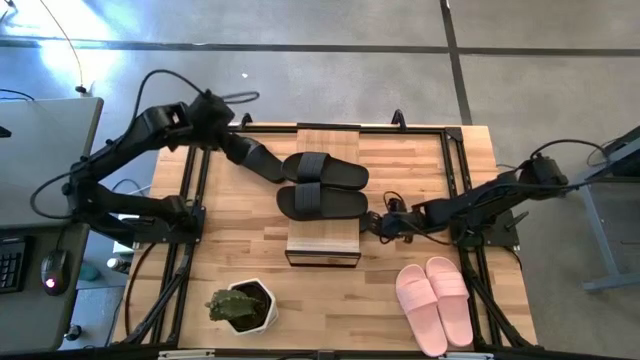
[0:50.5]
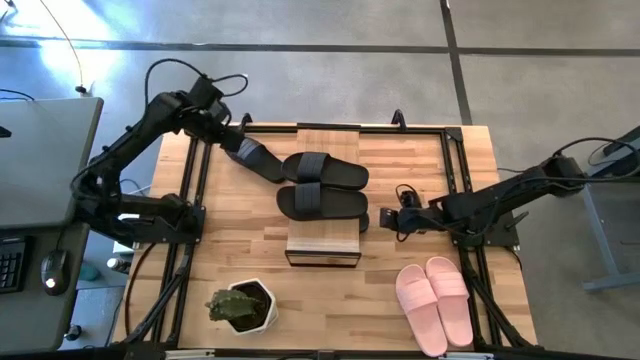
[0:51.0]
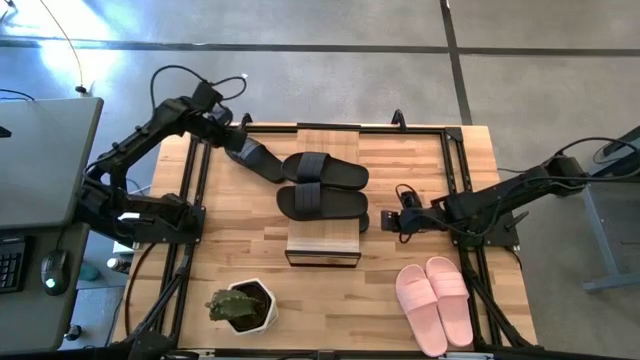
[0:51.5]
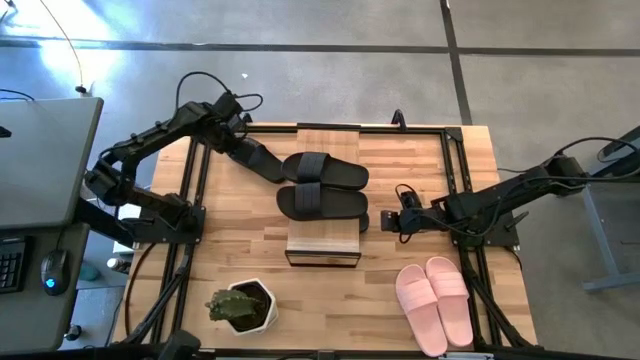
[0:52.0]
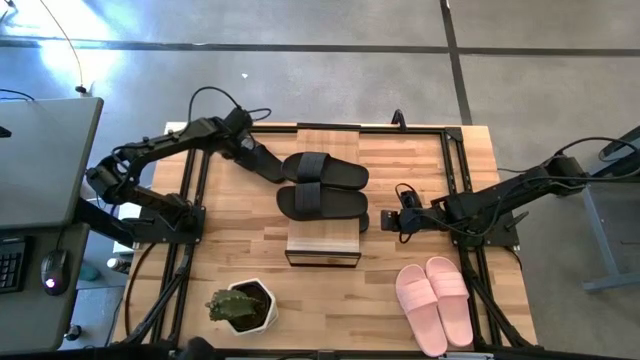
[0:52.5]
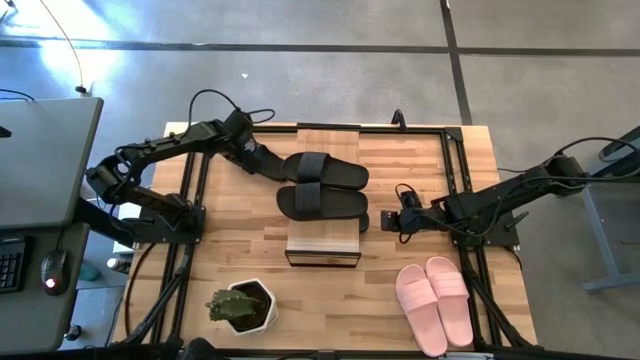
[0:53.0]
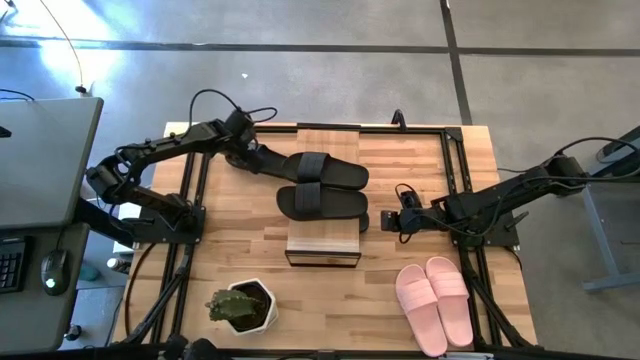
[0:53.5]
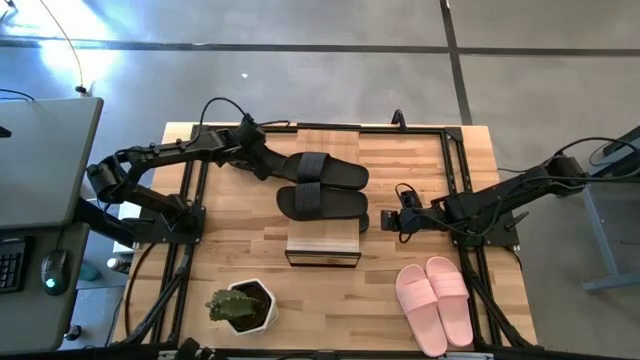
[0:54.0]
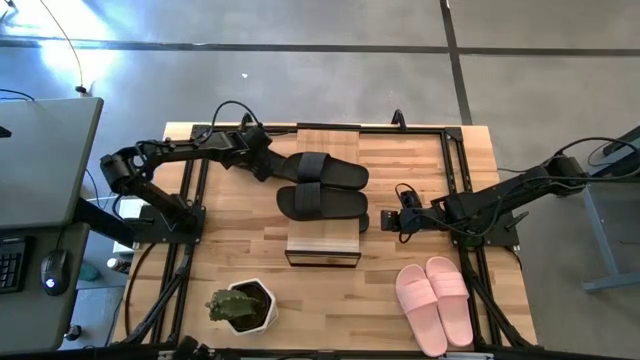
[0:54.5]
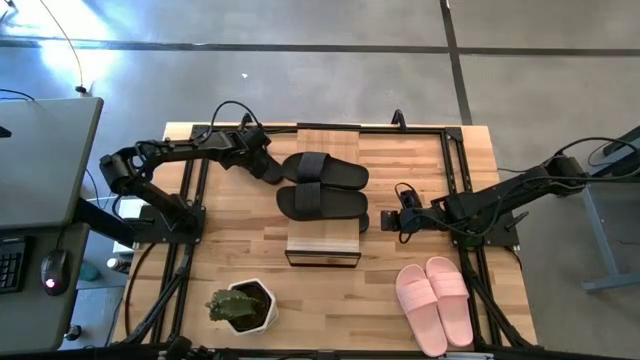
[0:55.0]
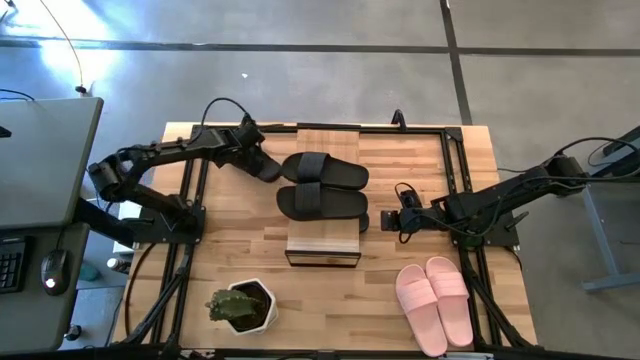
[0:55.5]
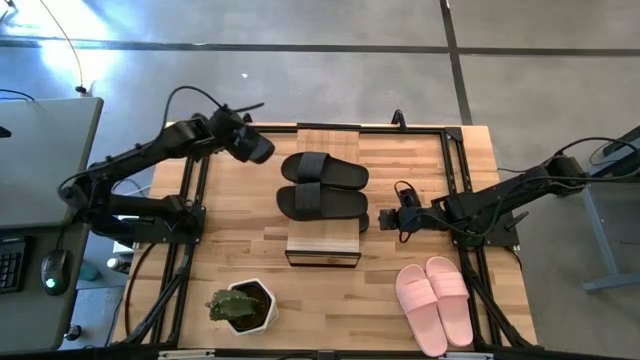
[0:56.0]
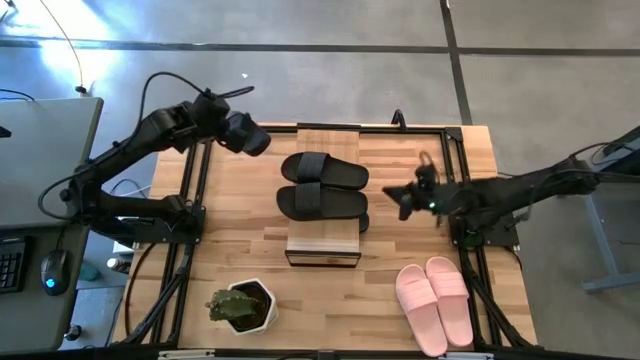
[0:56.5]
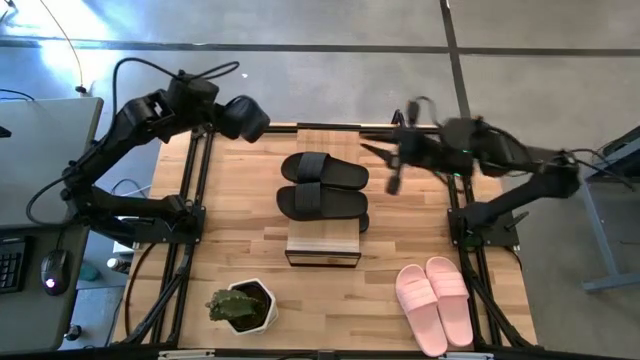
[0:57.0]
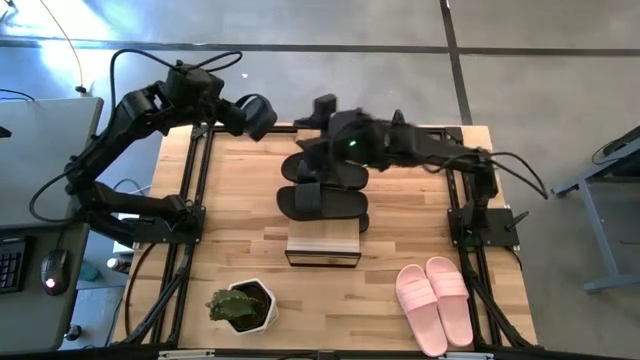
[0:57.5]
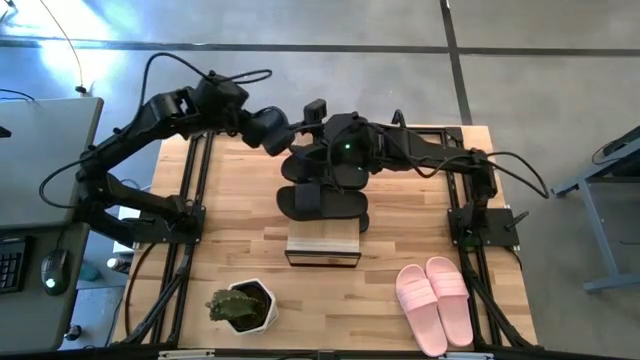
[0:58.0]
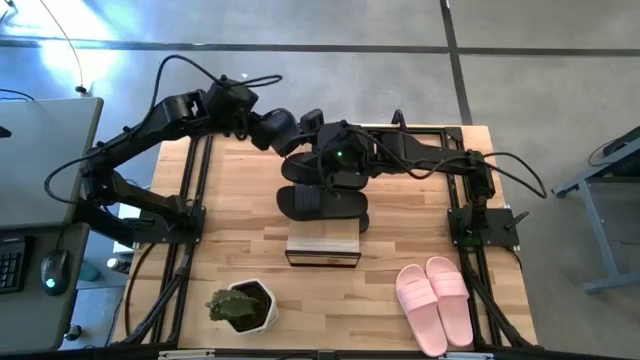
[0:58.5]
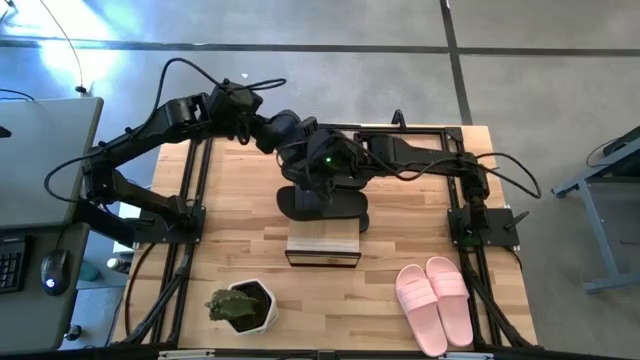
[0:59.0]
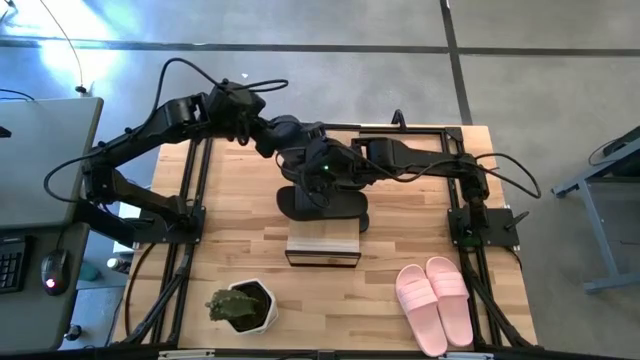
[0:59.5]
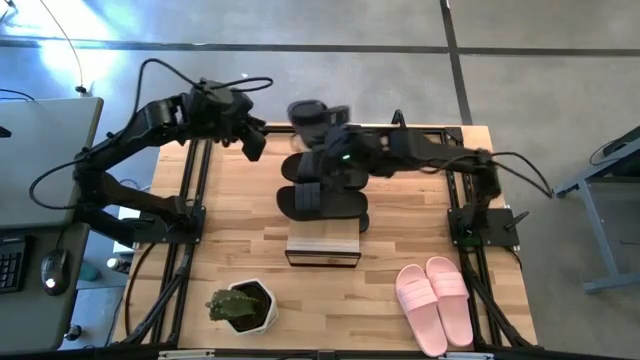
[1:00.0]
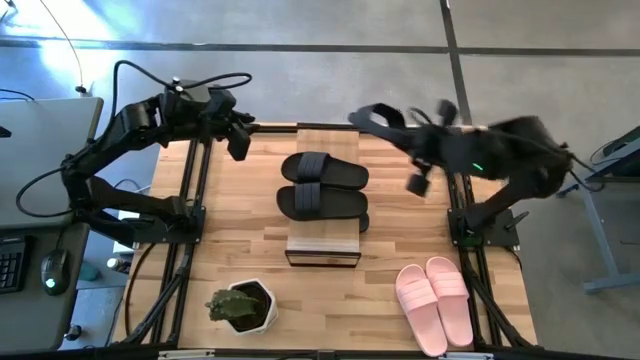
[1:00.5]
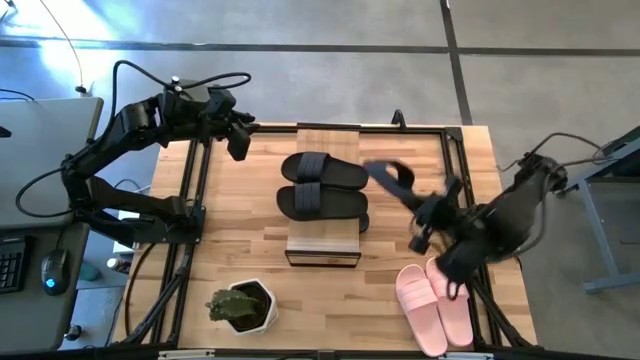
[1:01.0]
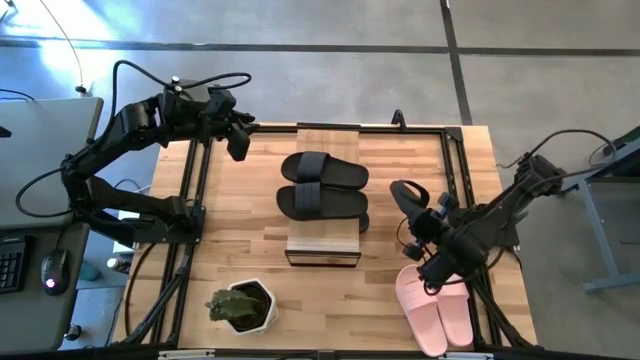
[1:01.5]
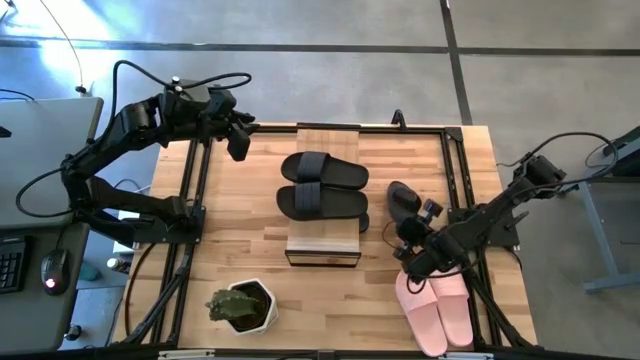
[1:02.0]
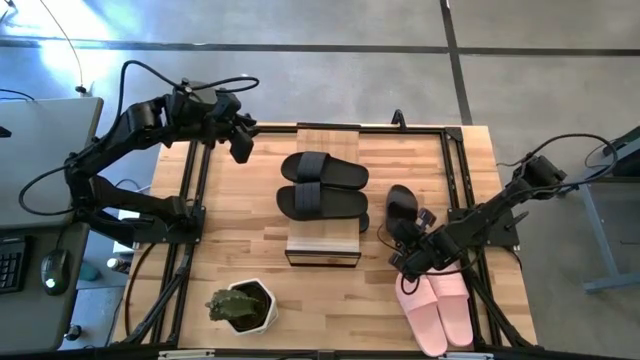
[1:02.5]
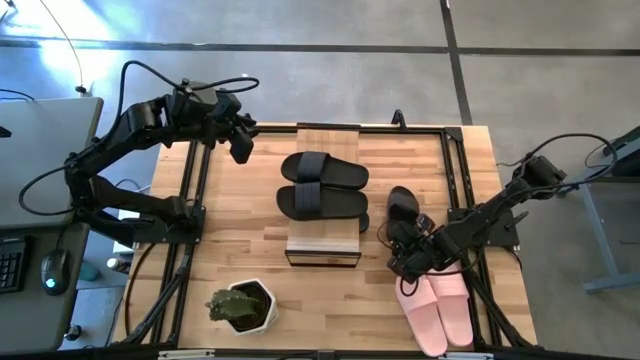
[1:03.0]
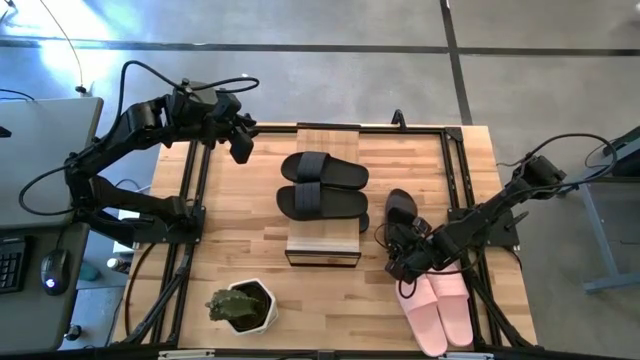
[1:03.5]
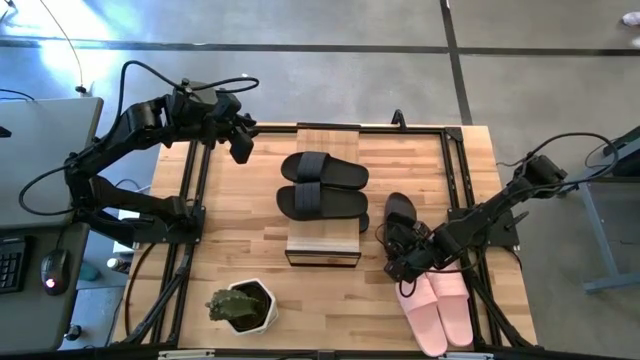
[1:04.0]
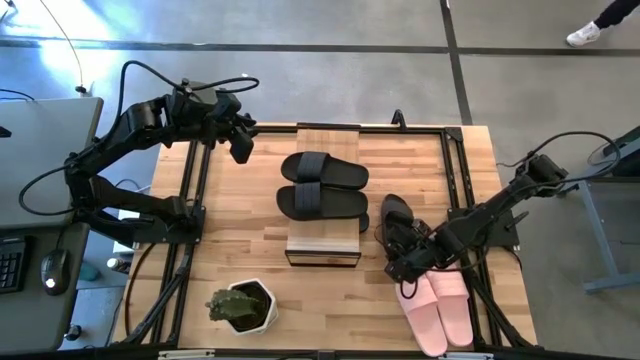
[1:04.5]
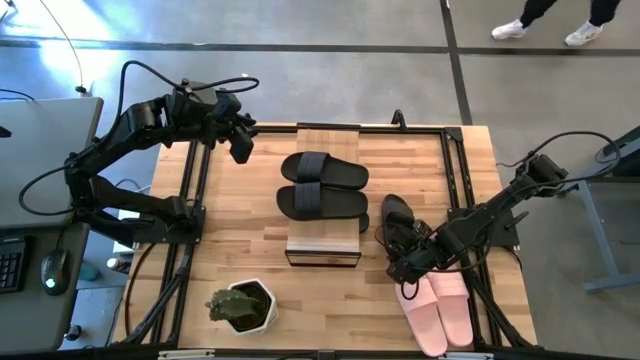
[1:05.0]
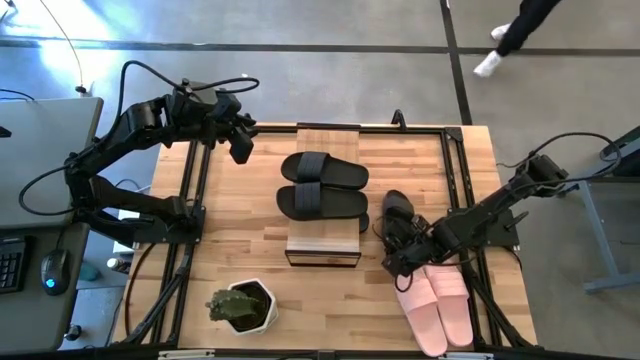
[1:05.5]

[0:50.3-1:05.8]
Task: Pick and place slides into the shelf
Put the black slipper under the shelf

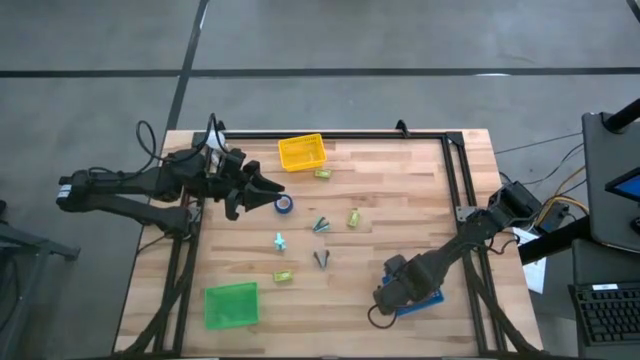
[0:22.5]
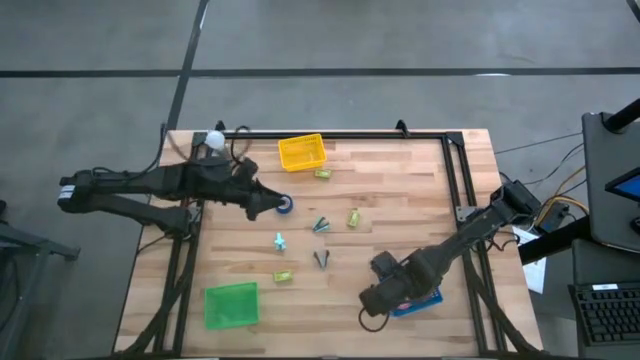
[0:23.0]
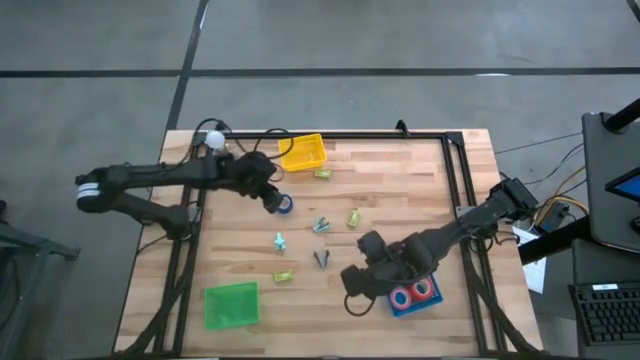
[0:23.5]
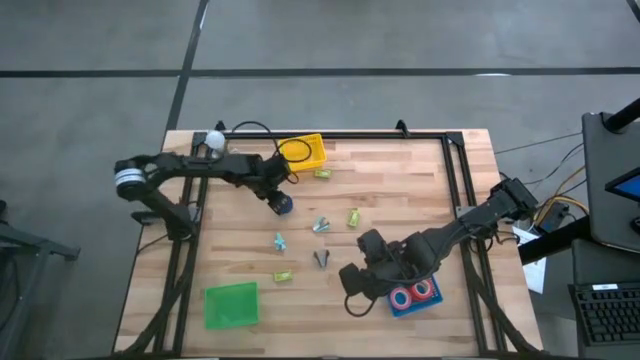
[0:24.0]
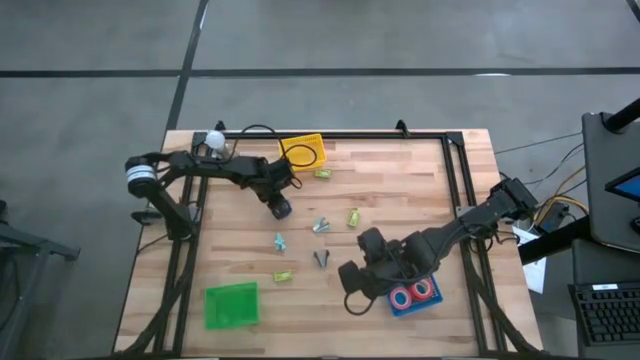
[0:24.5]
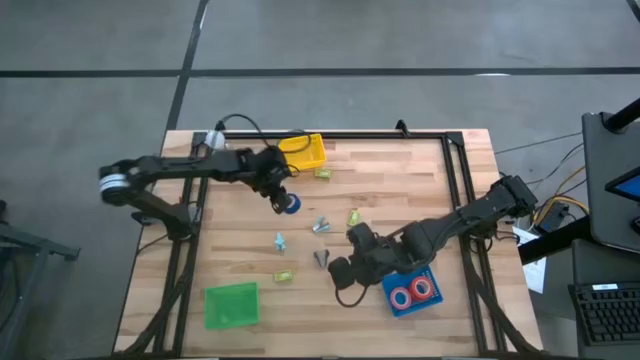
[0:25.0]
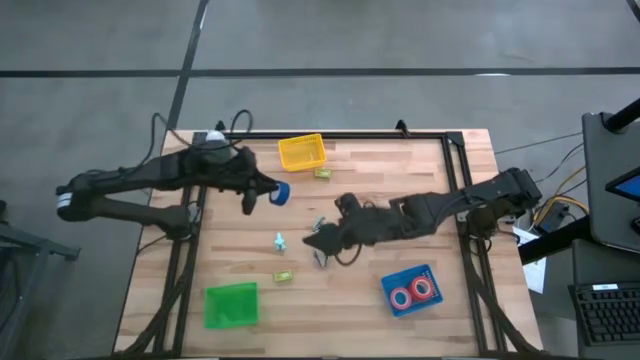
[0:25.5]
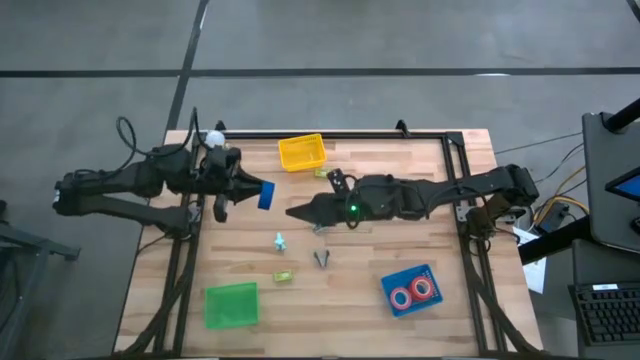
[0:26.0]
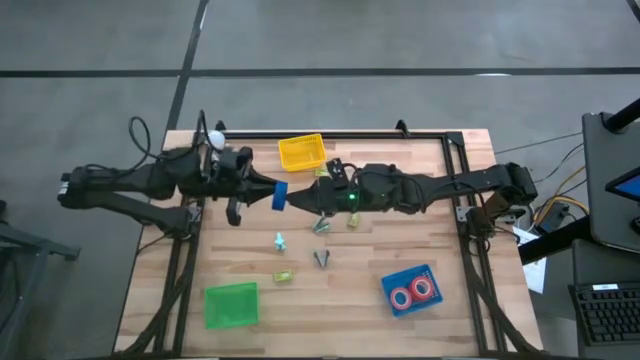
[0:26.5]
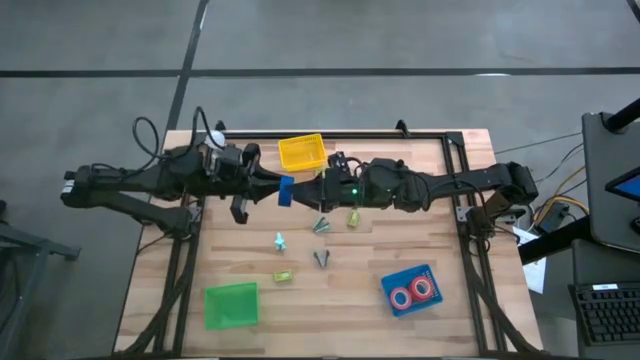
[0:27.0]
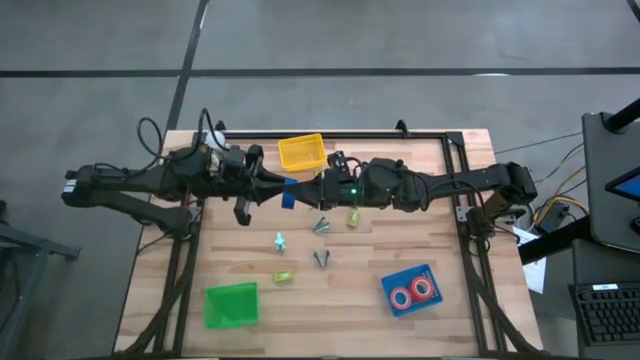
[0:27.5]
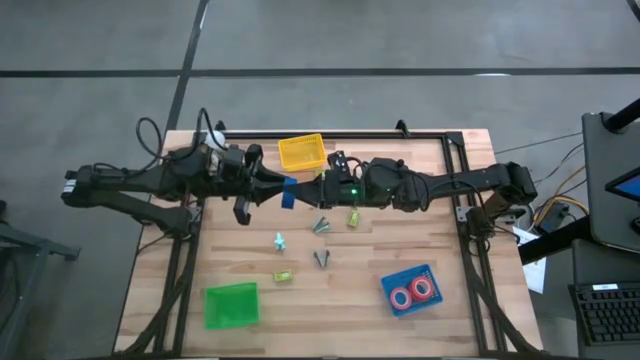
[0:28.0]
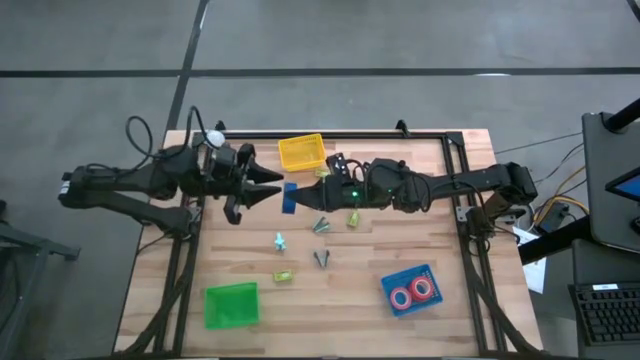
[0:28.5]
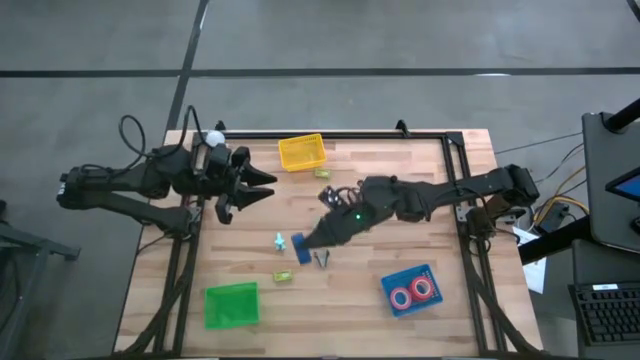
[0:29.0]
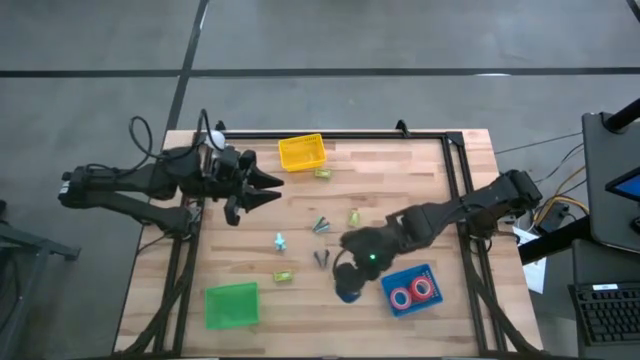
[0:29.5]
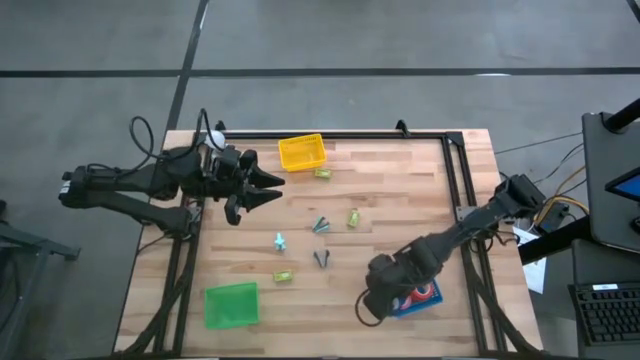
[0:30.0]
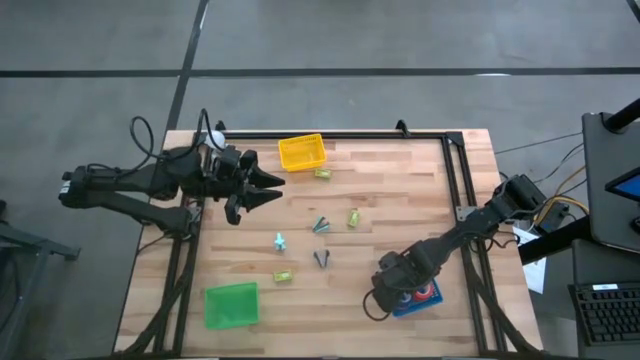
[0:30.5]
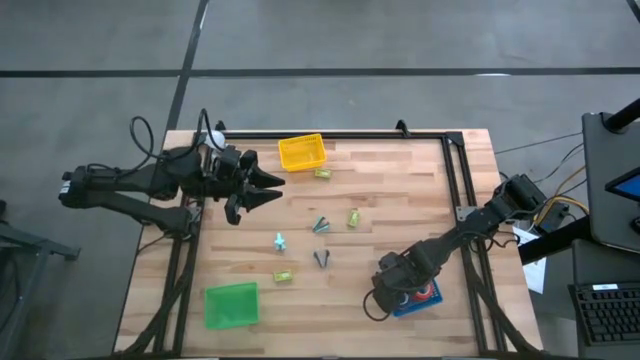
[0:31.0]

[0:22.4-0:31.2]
Task: Pick and place Stapler, Stapler remover, tape
Put the blue tape into the blue basket
